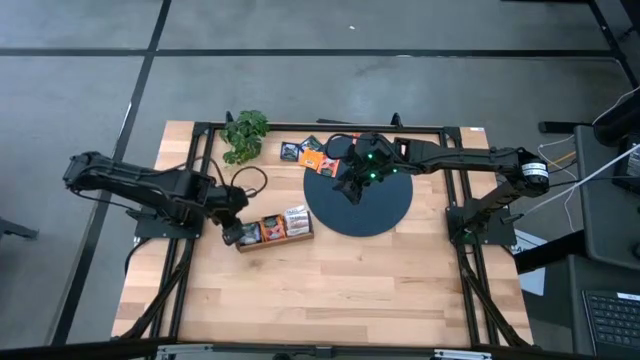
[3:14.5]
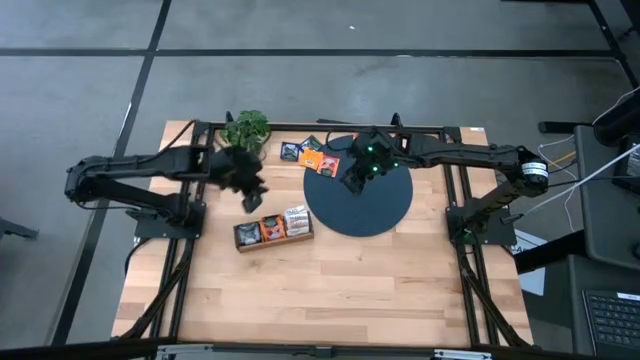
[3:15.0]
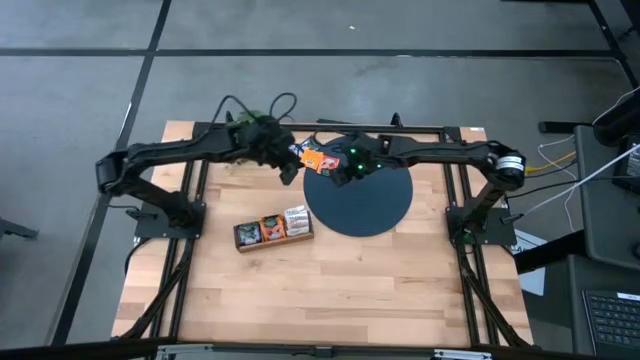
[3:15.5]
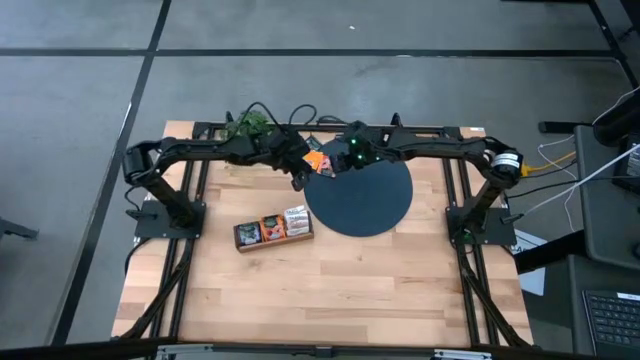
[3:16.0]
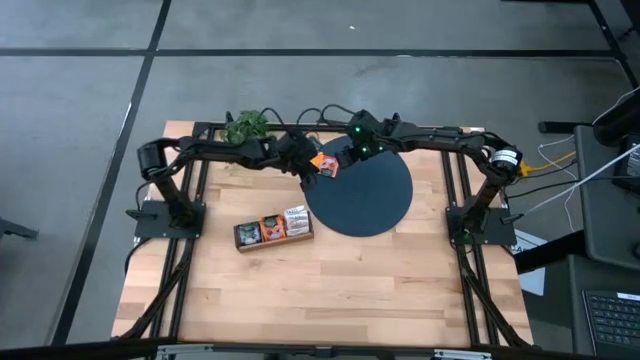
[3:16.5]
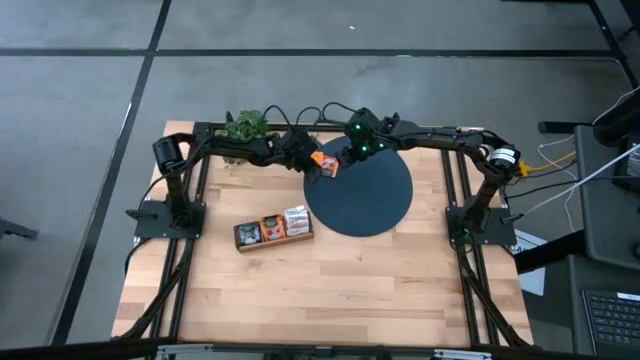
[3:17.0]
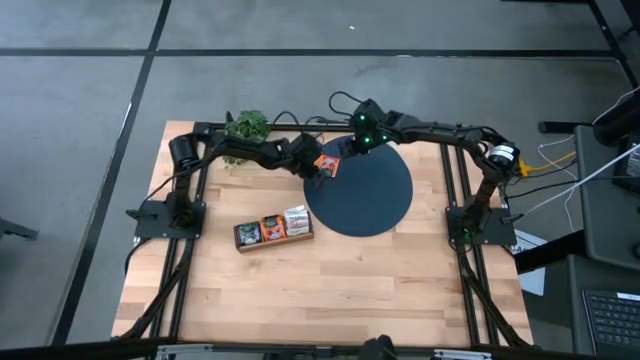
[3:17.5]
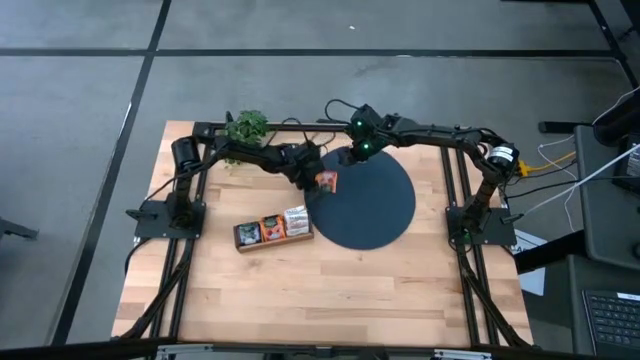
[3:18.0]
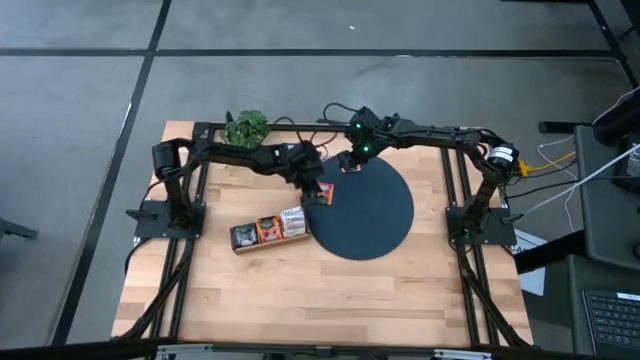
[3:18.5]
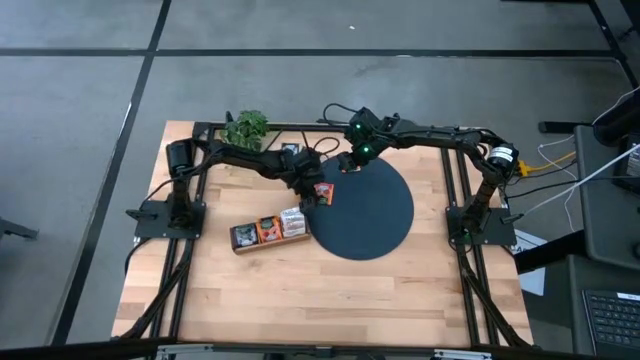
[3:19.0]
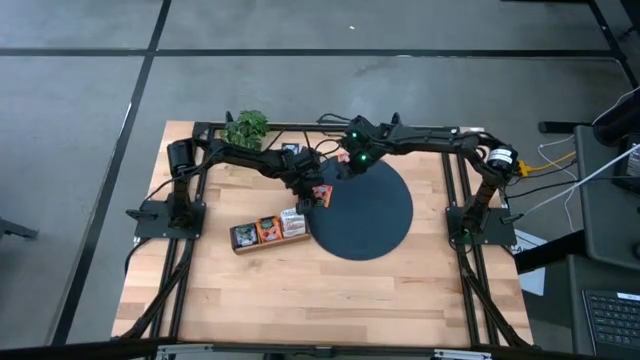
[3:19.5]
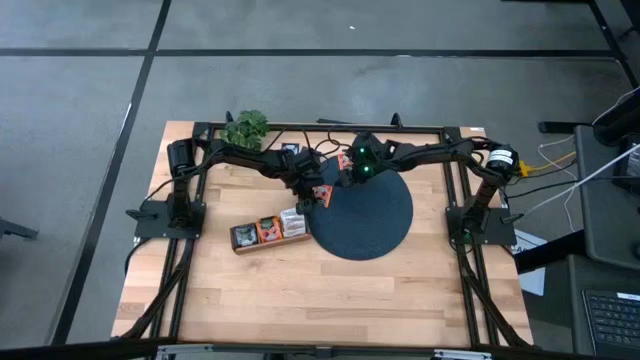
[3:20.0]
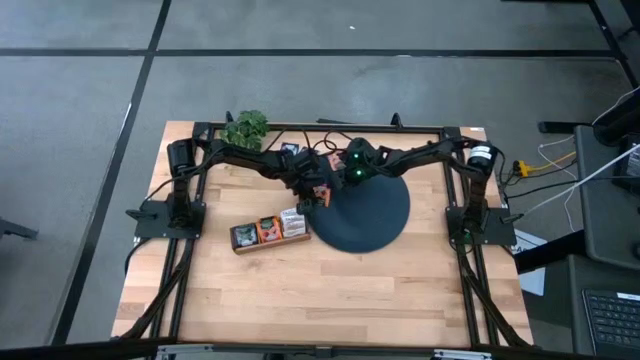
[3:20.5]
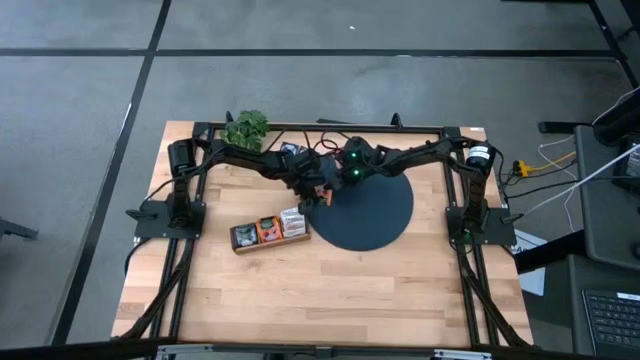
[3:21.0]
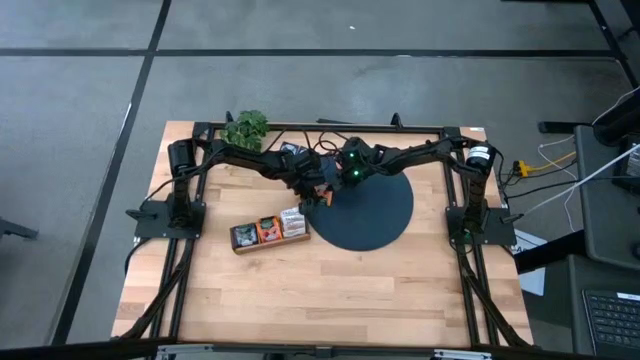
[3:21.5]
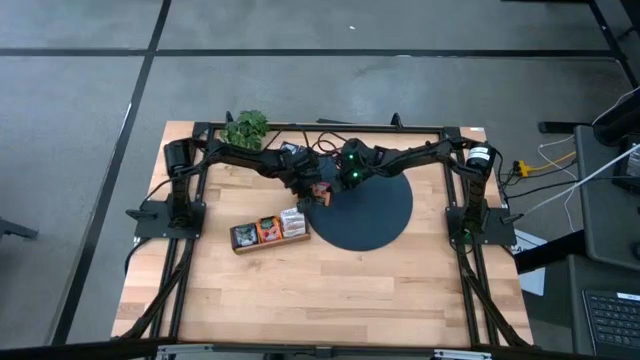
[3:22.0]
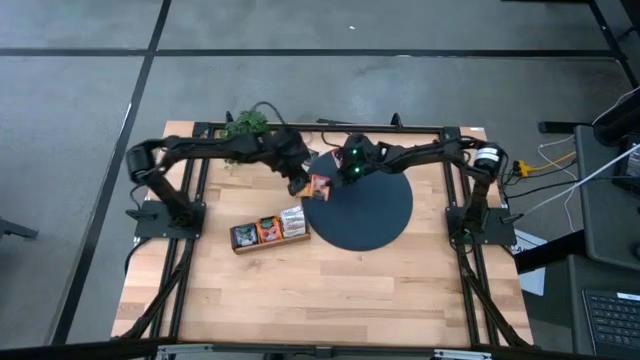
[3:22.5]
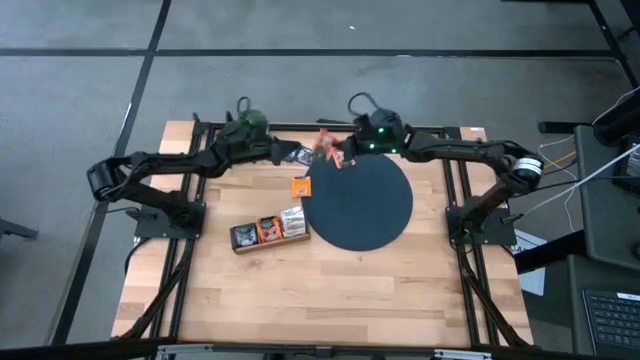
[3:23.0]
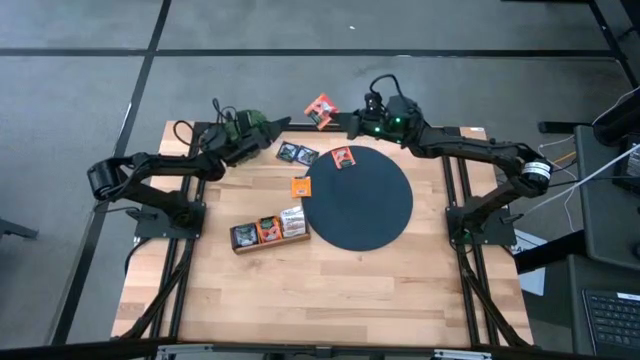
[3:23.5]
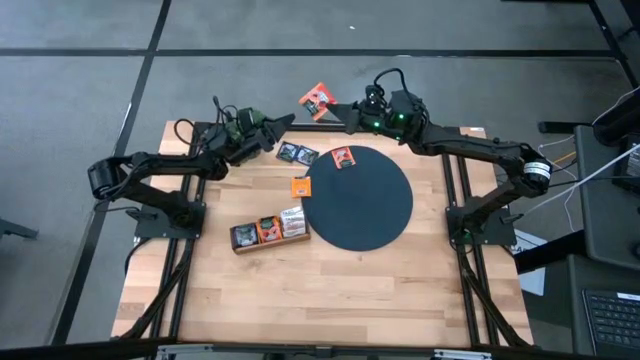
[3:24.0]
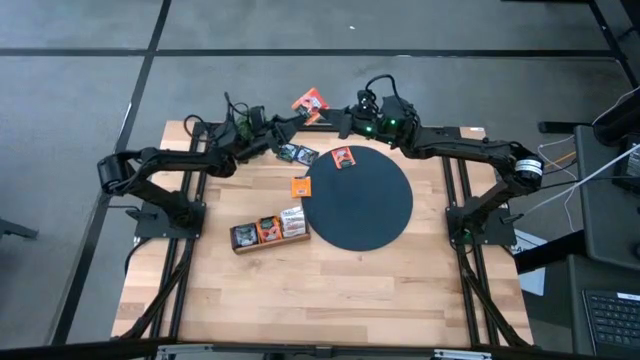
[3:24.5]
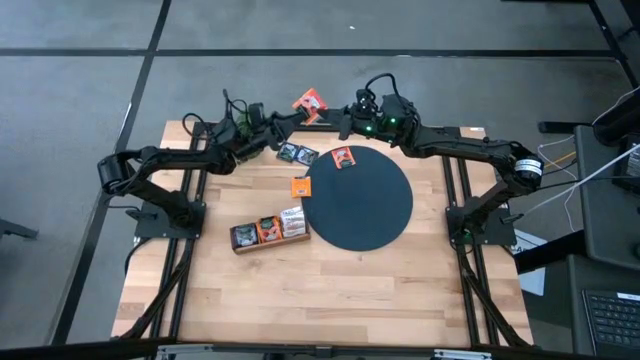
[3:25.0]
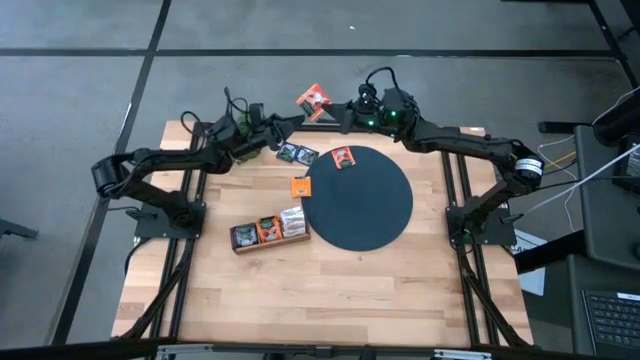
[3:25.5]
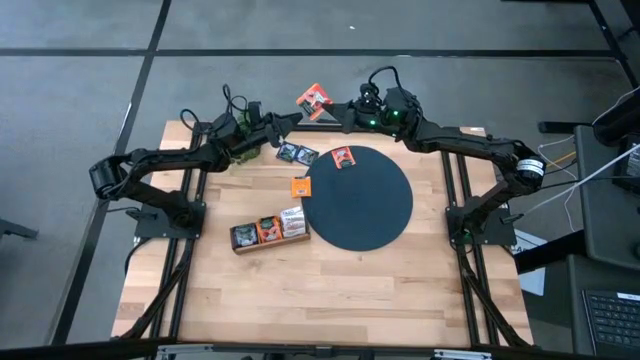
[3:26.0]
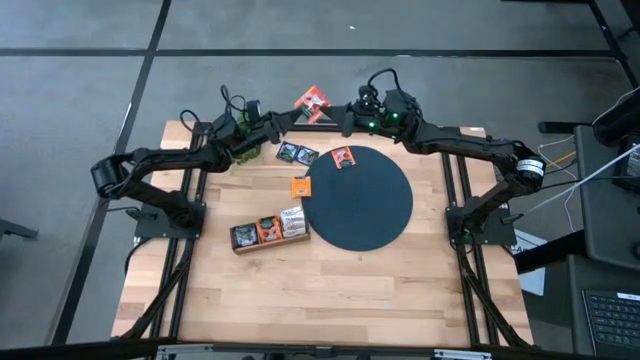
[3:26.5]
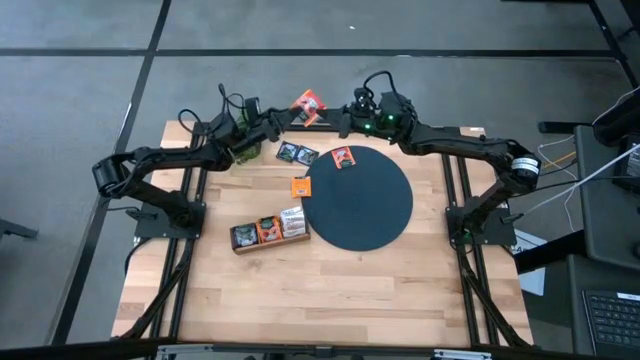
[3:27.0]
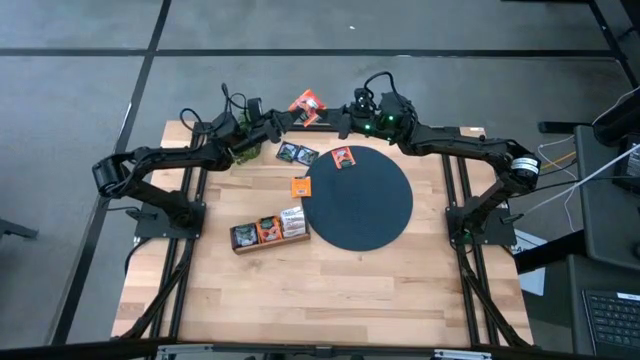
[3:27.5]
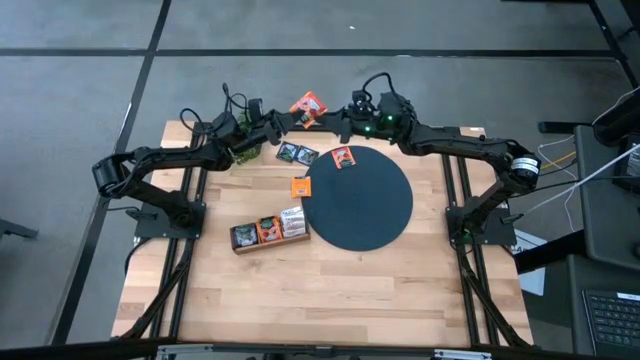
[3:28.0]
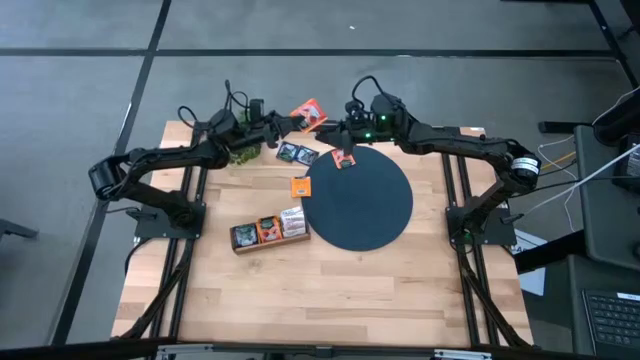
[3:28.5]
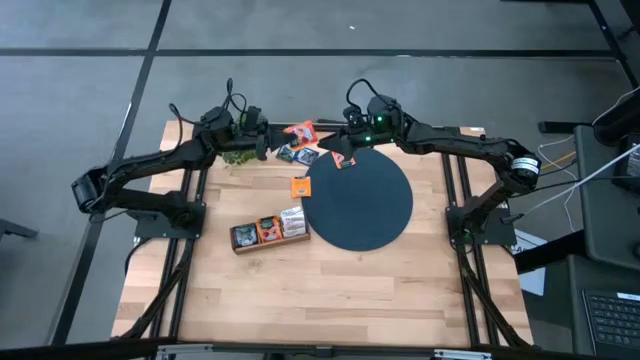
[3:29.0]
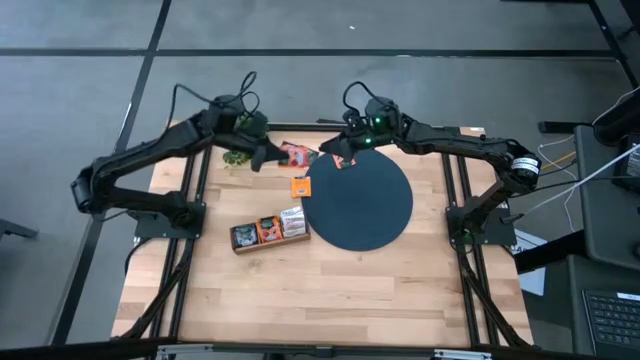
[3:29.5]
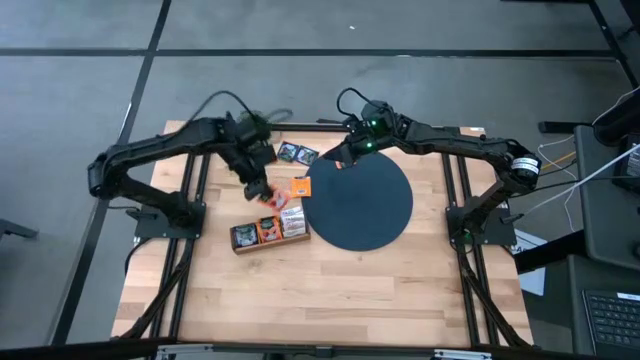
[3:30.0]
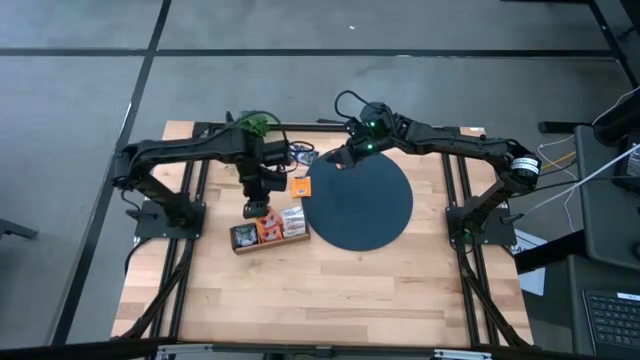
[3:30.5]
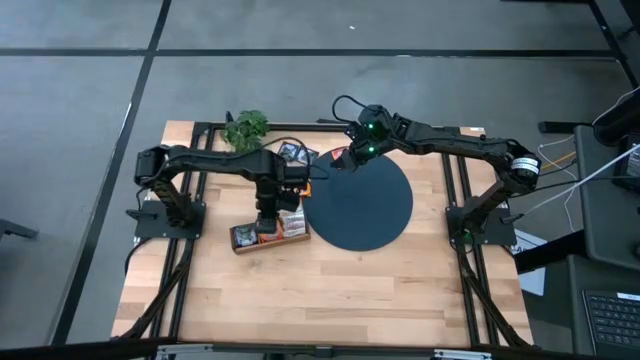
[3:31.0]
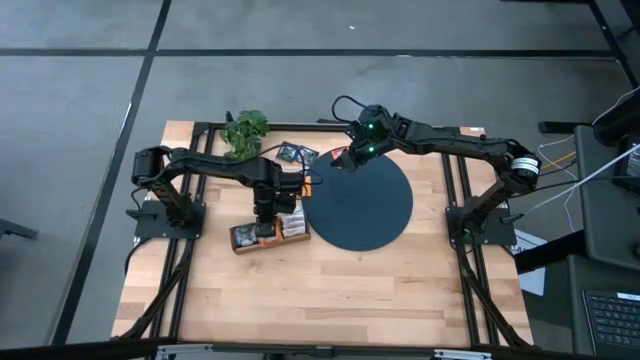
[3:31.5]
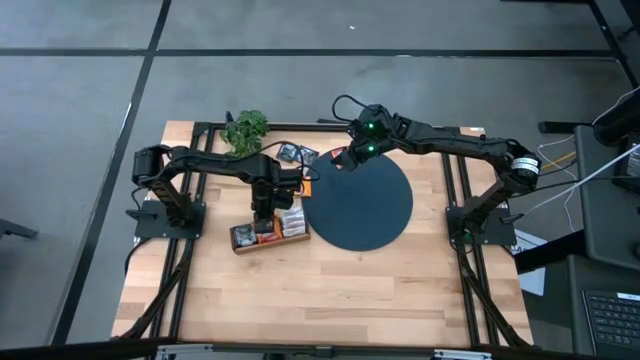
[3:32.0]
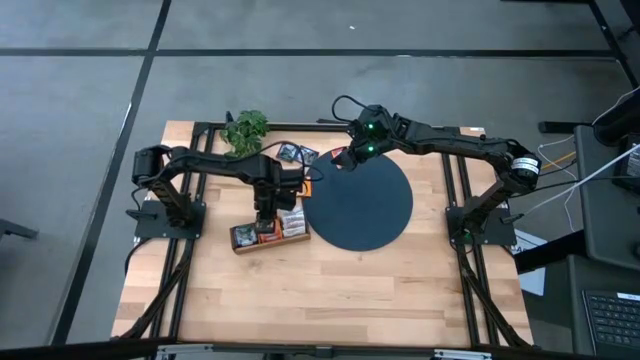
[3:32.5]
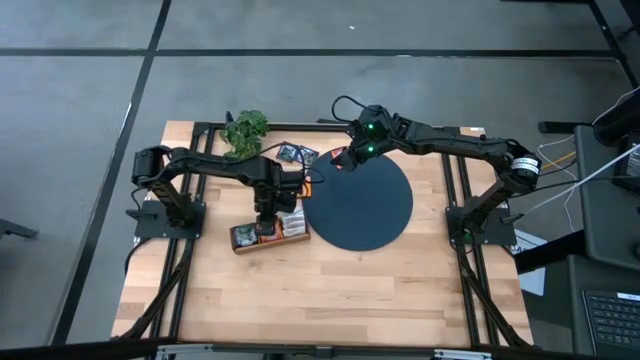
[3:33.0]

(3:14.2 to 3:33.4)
Task: Pick & Place Tea
Put the orange tea bag into the middle section of the wooden organizer

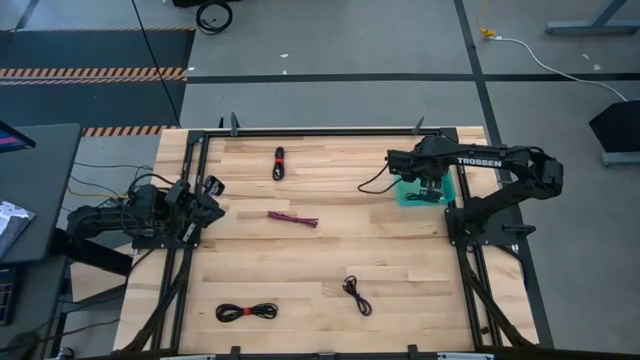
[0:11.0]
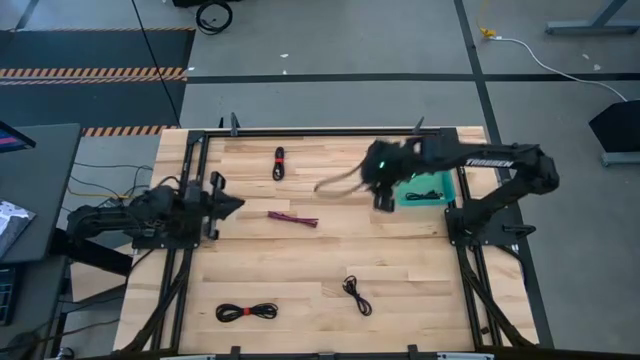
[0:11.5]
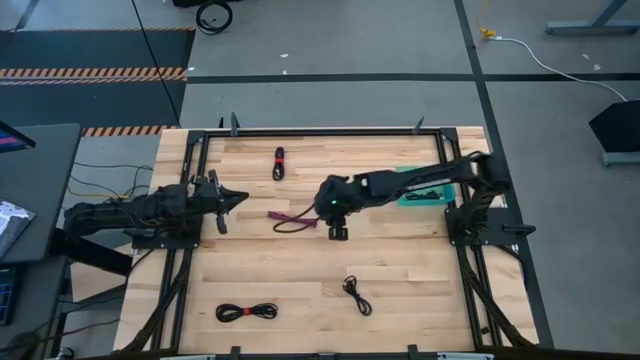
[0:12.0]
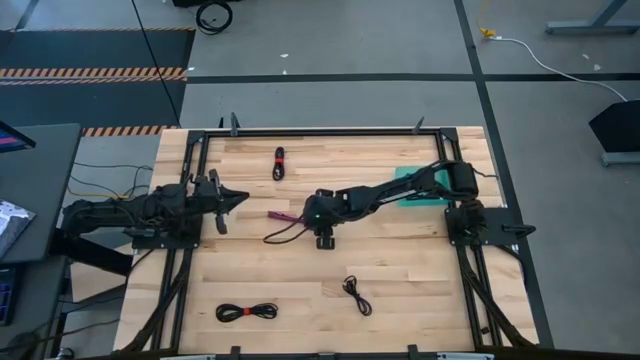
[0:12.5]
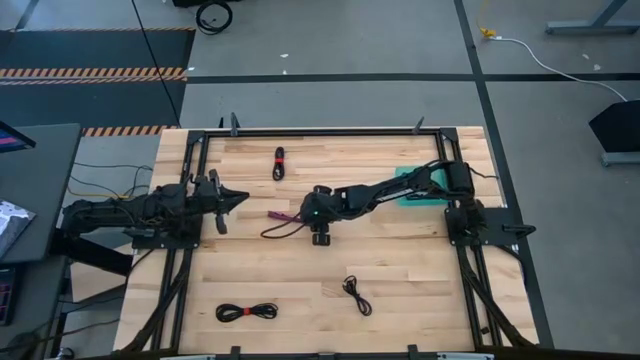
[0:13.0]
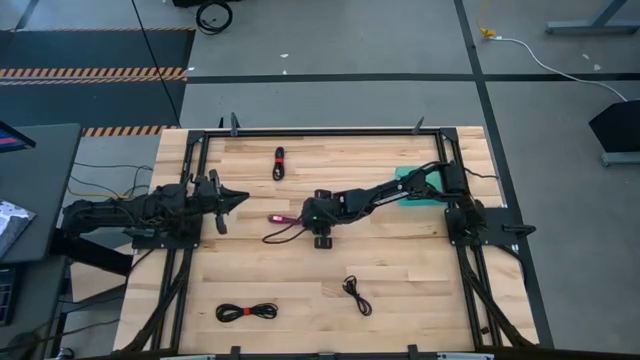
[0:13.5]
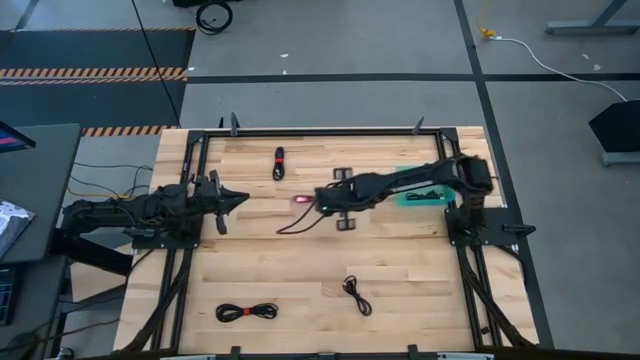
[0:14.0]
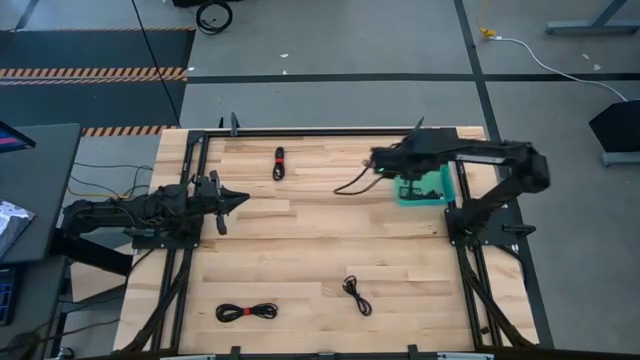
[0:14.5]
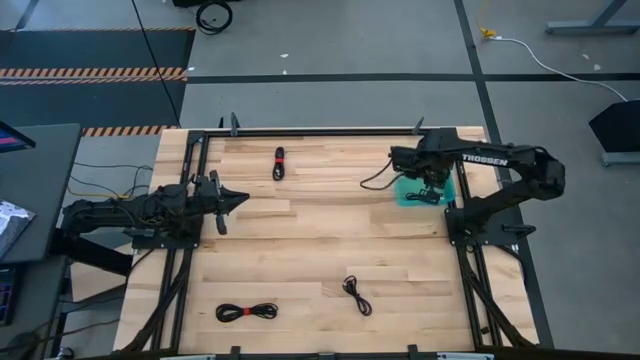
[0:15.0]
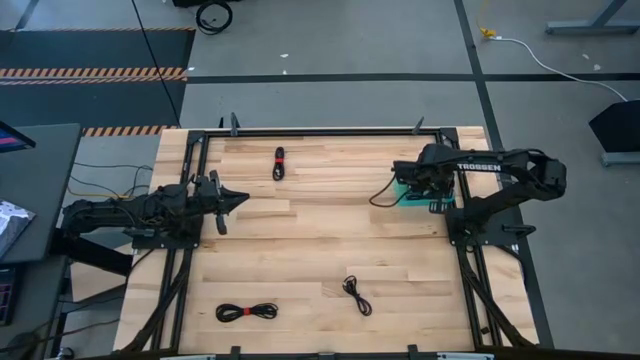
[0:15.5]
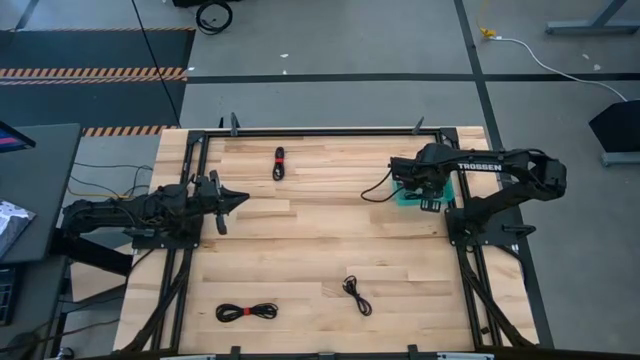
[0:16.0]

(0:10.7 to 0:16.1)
Task: Pick and place USB-C Cables
Put the red charger cable into the bin
